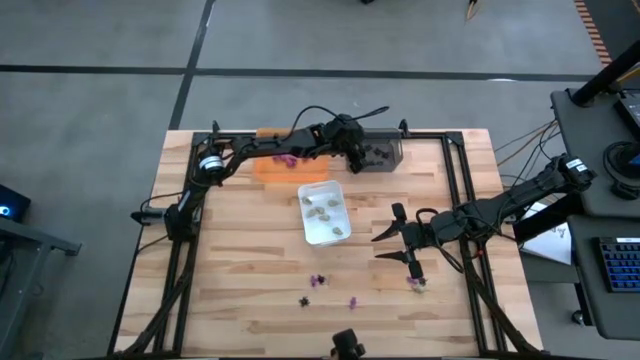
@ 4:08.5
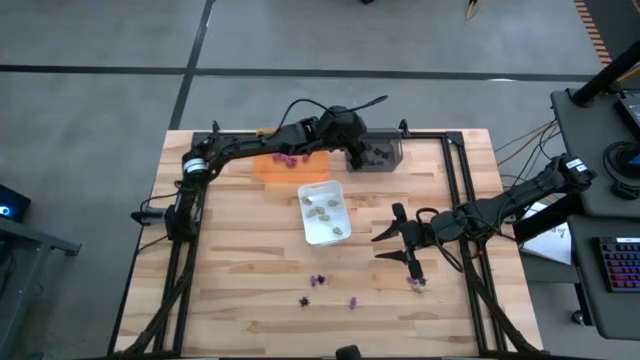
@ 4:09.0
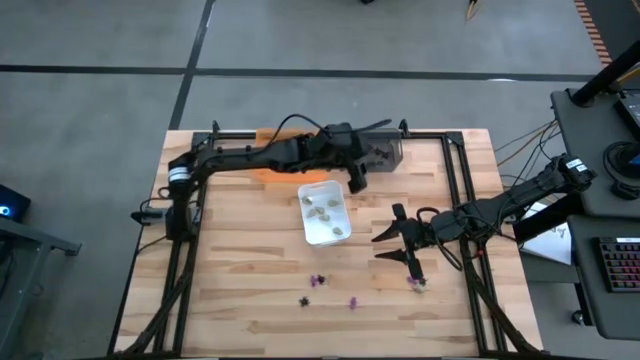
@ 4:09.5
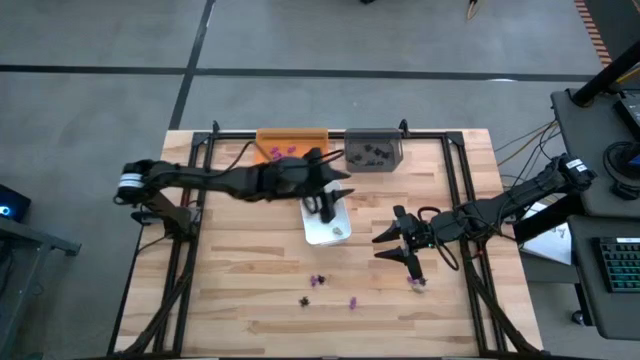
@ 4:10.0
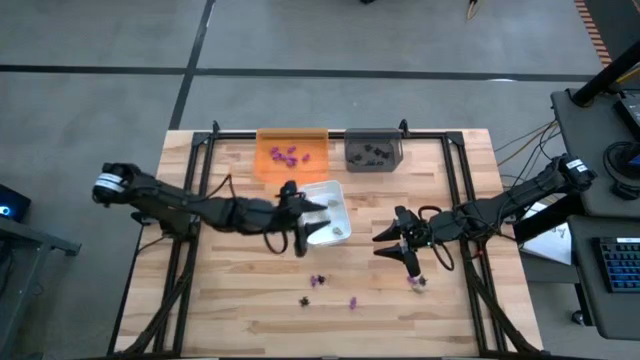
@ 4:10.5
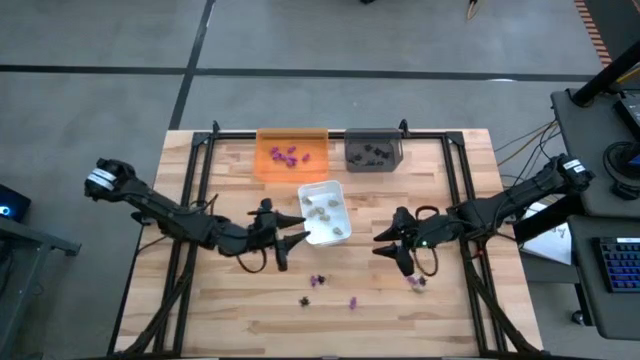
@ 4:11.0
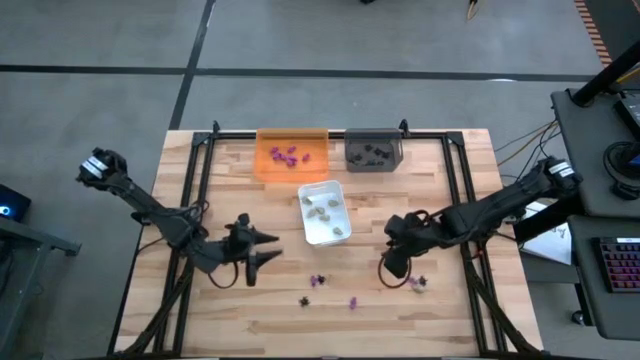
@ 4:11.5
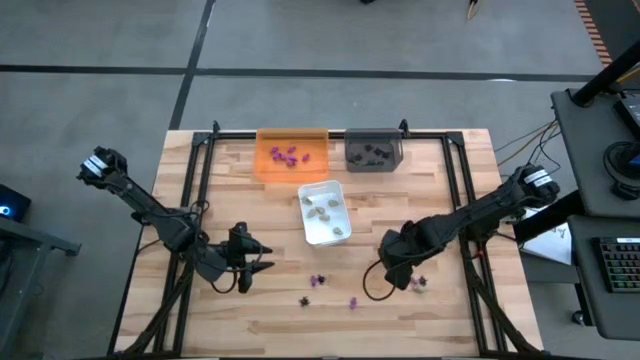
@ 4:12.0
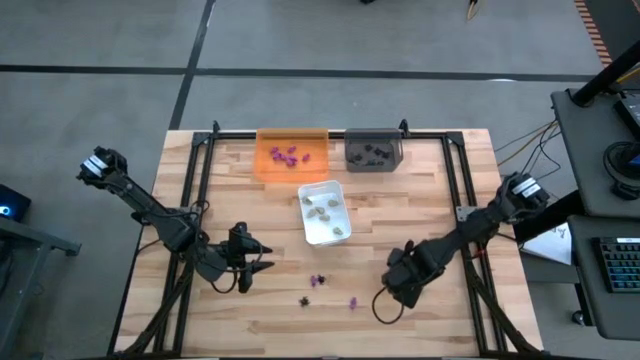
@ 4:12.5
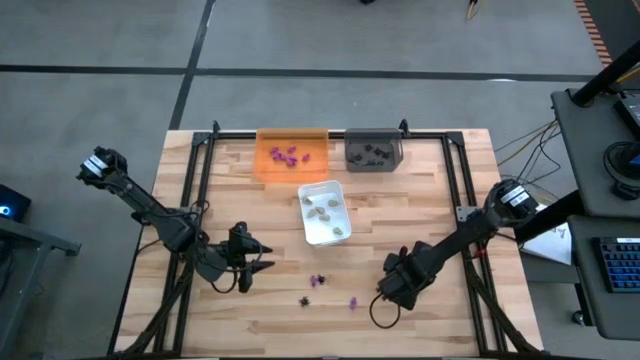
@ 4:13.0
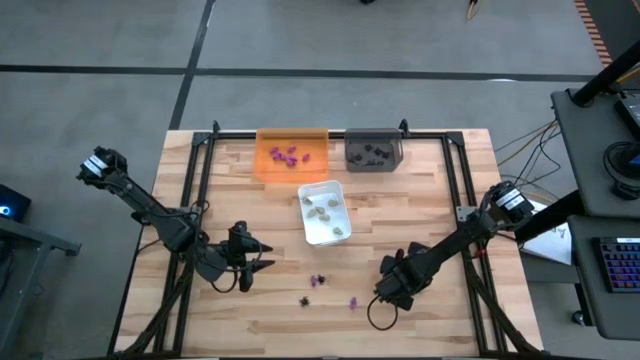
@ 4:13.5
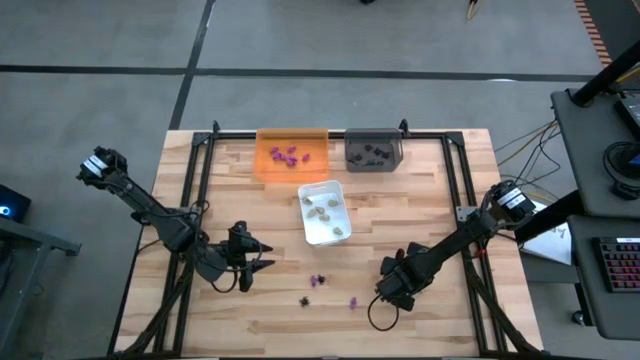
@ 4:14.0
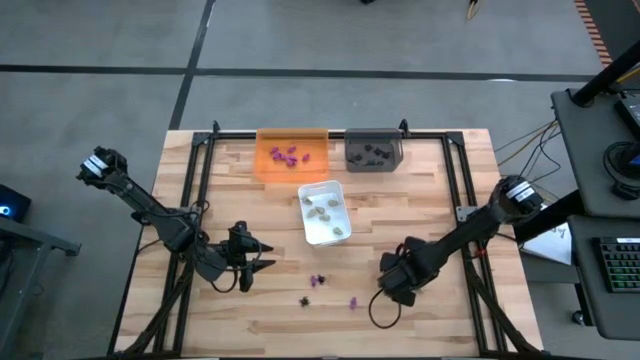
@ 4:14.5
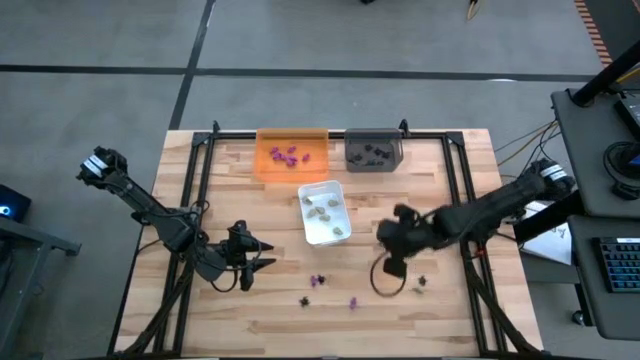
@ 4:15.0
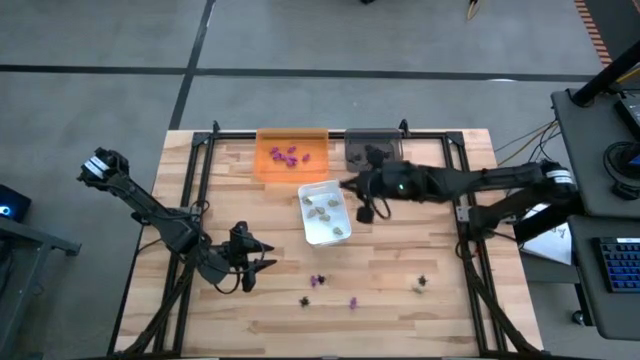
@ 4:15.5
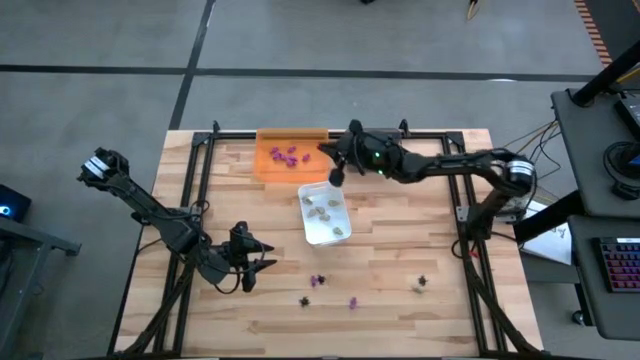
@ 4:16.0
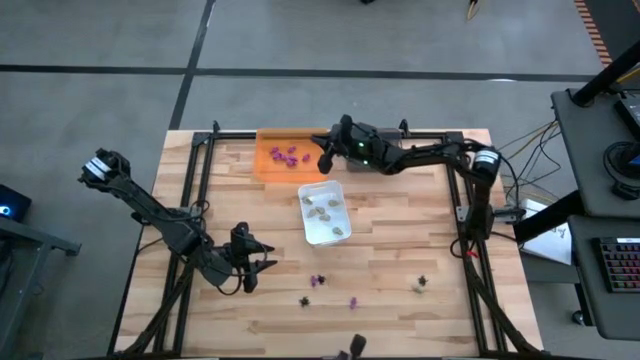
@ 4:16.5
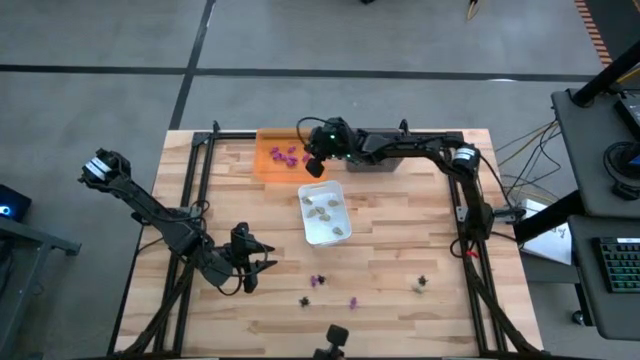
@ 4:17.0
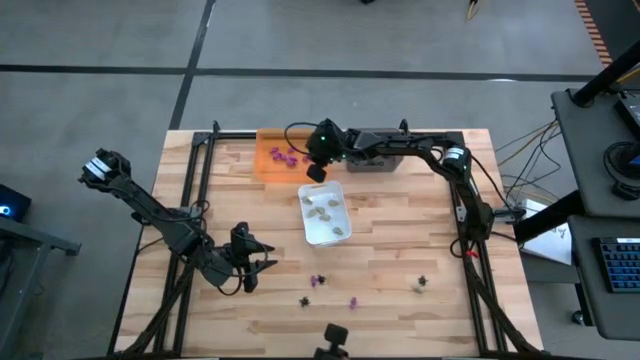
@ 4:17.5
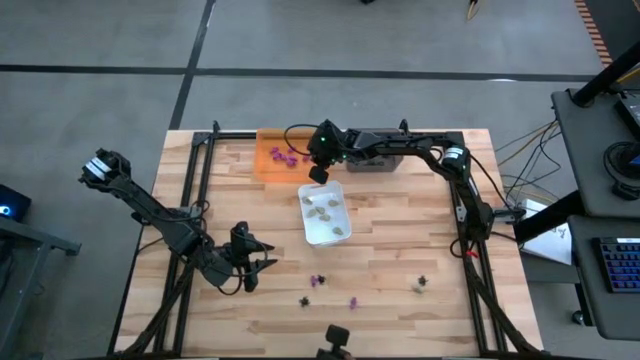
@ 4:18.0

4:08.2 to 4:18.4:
Task: Sort Halloween decoration
Put the purple skeleton toy into the orange bin

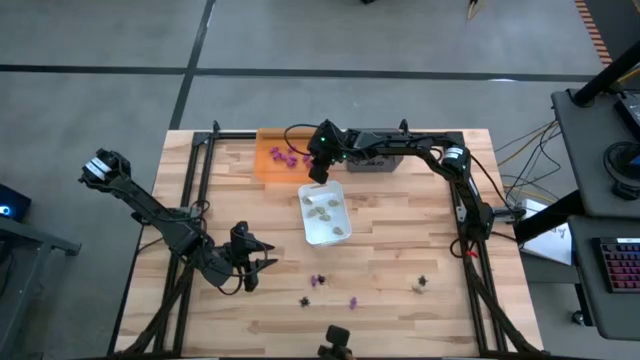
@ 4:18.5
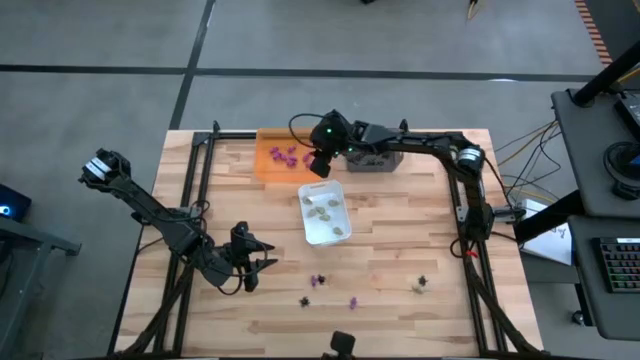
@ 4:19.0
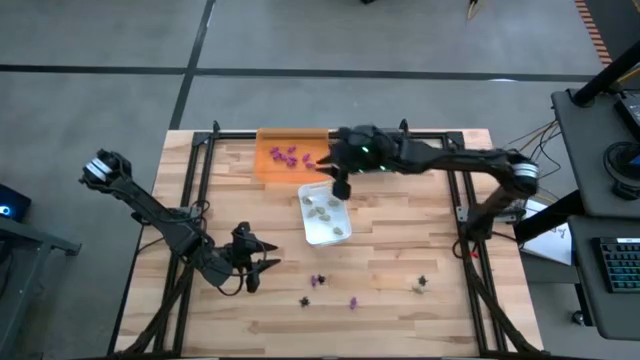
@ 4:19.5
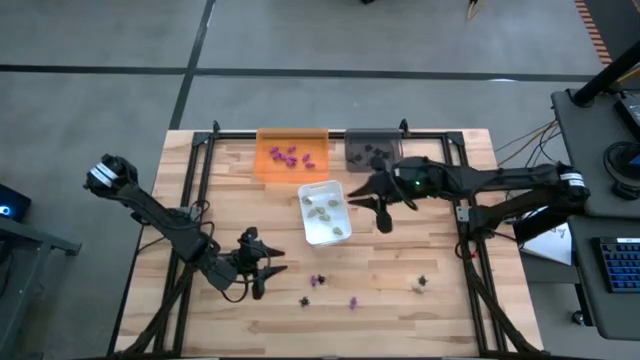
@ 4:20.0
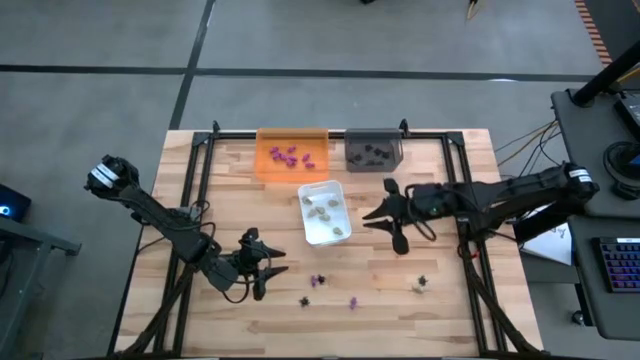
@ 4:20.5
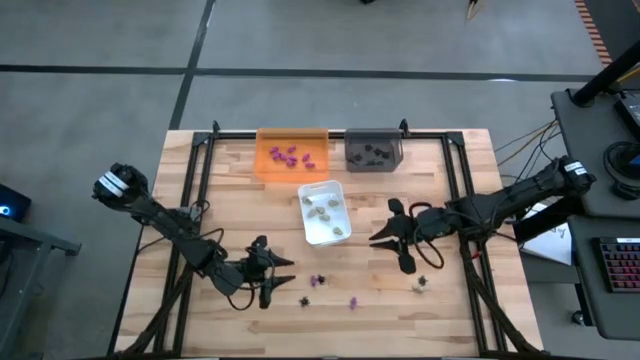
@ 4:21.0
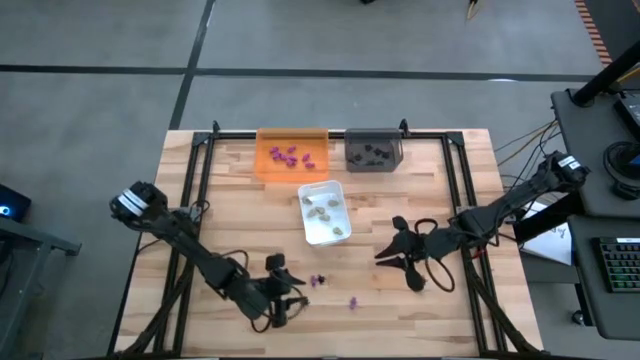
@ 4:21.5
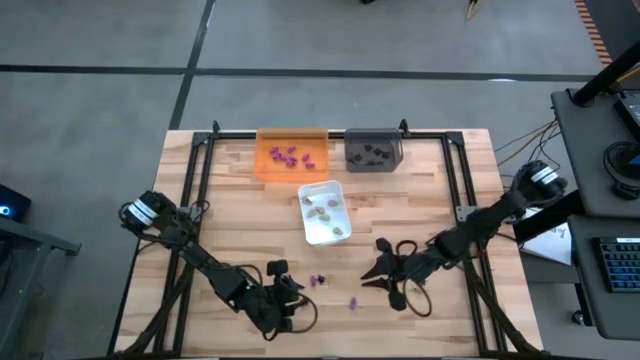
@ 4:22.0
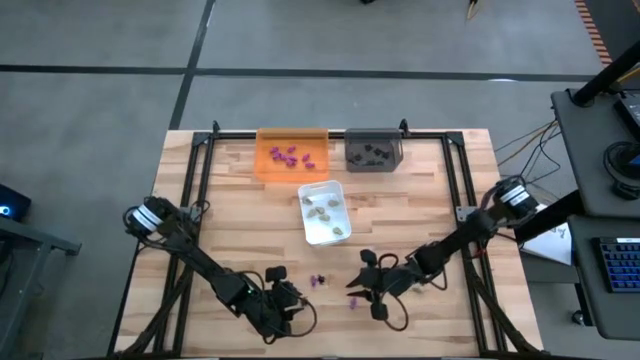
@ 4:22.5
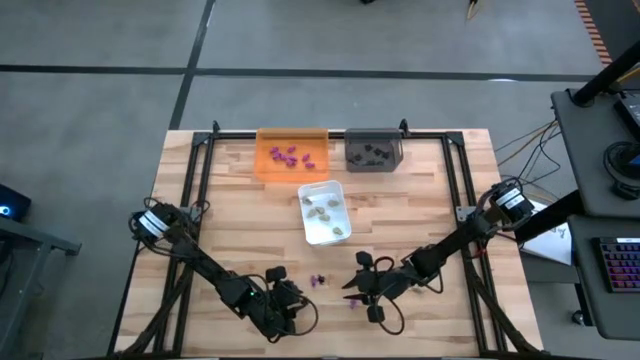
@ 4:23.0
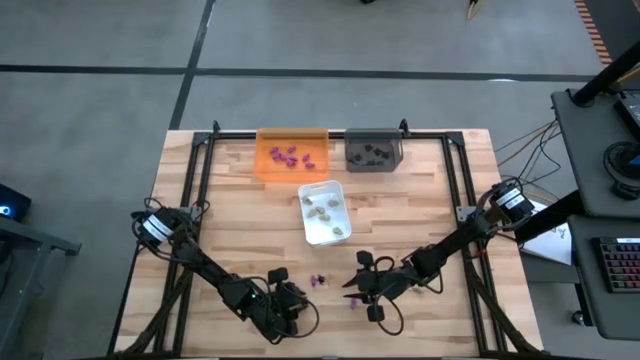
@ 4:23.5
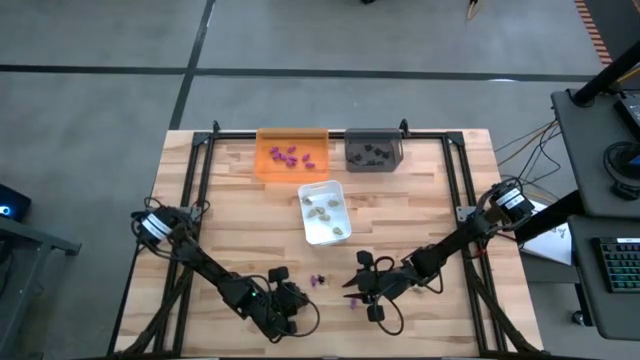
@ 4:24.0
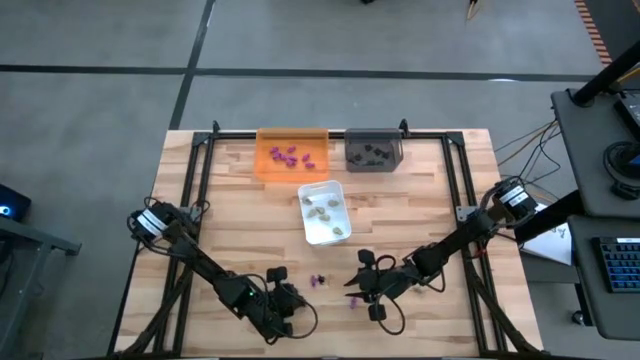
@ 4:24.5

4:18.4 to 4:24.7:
Put the black spider toy into the black bin

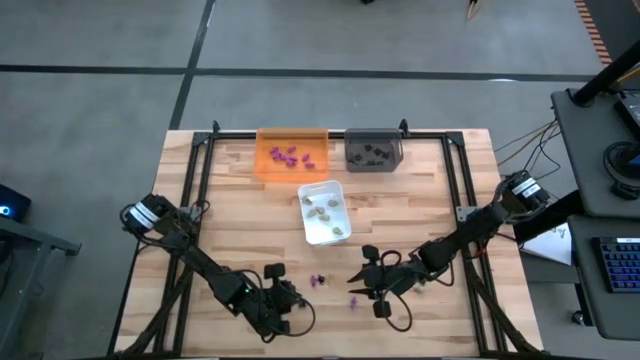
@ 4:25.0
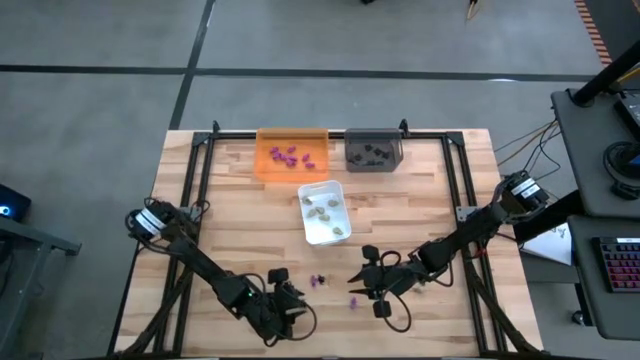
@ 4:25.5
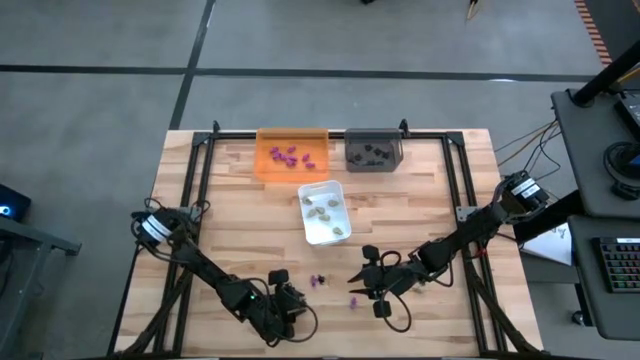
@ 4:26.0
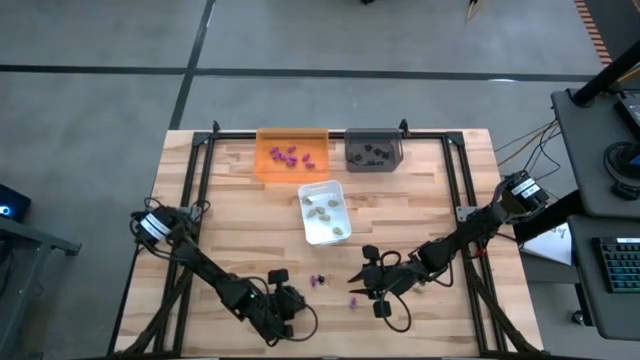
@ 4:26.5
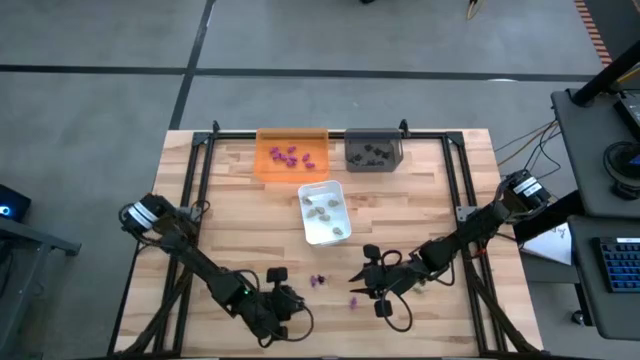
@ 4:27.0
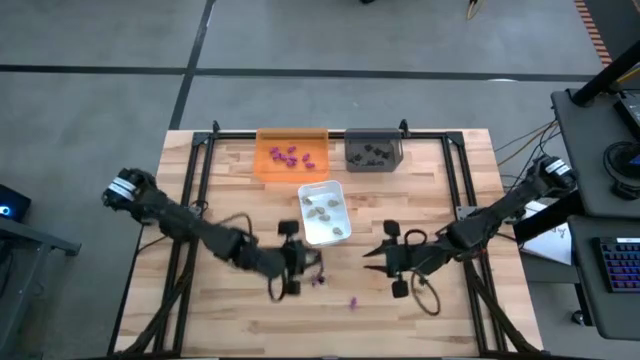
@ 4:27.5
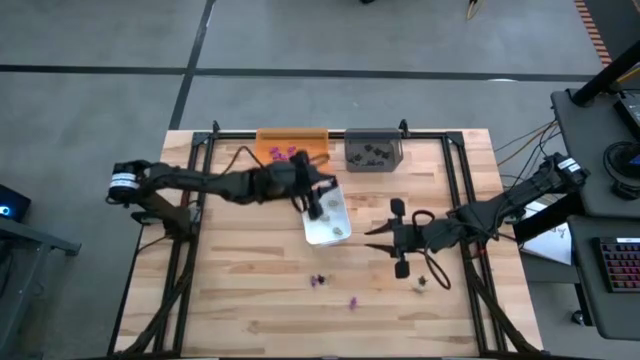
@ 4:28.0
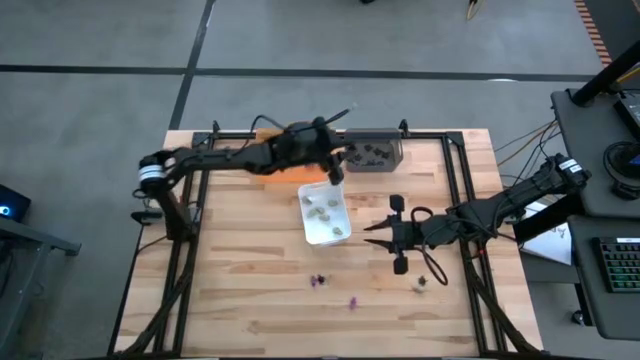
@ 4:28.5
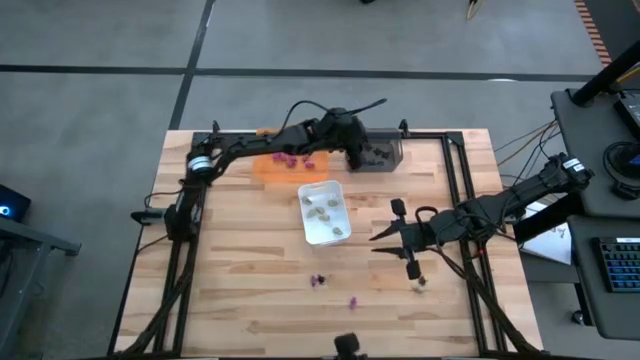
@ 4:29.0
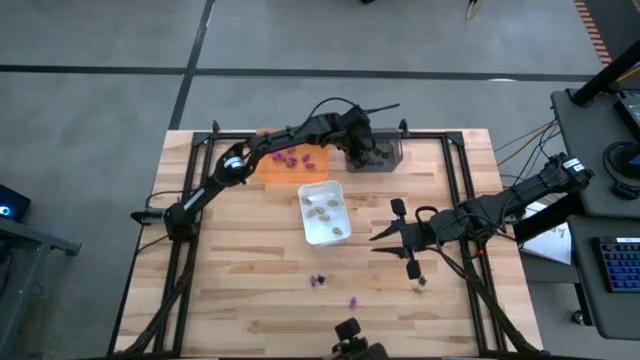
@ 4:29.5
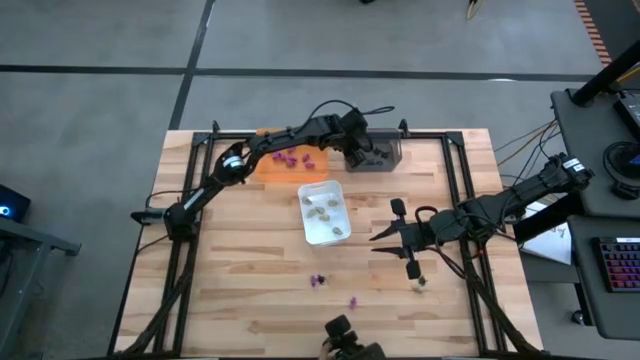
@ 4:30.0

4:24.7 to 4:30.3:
Put the black spider toy into the black bin
